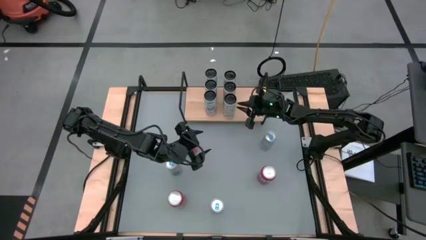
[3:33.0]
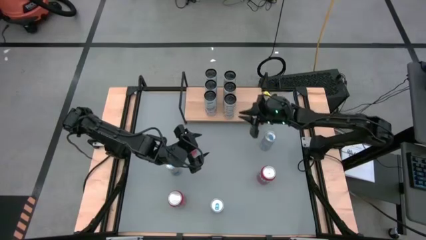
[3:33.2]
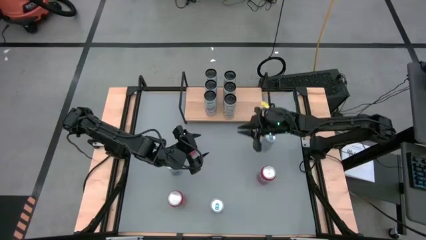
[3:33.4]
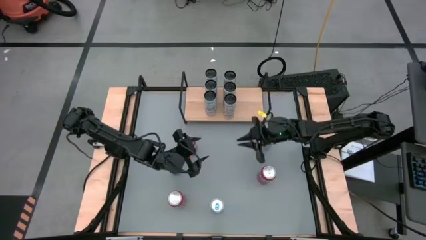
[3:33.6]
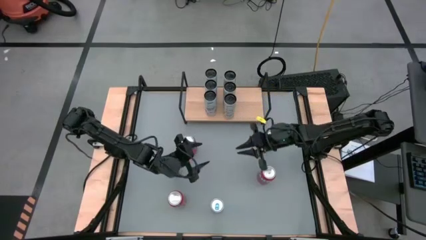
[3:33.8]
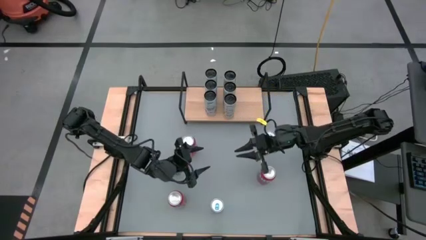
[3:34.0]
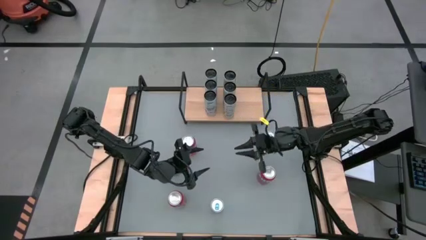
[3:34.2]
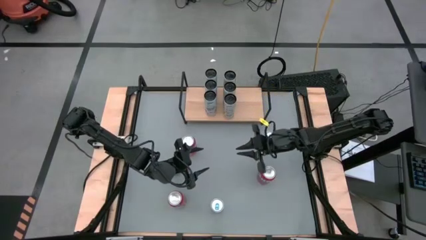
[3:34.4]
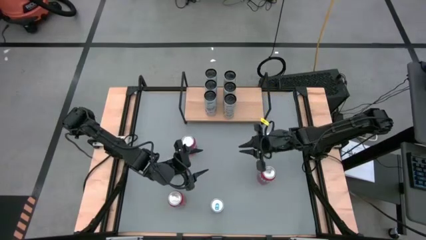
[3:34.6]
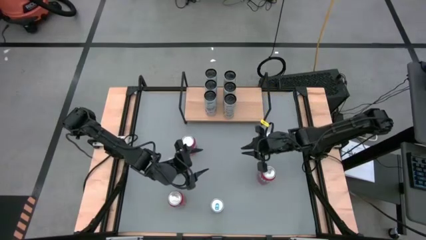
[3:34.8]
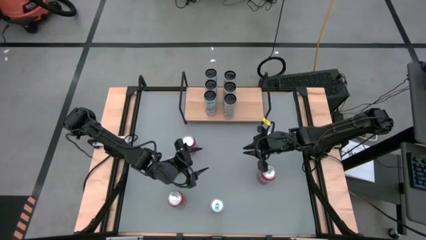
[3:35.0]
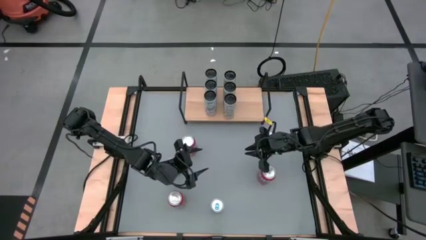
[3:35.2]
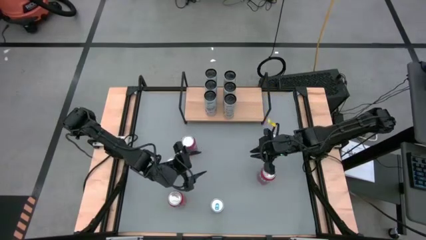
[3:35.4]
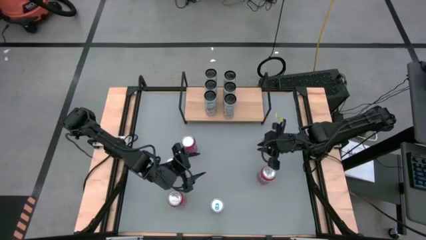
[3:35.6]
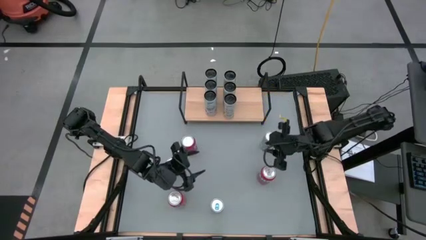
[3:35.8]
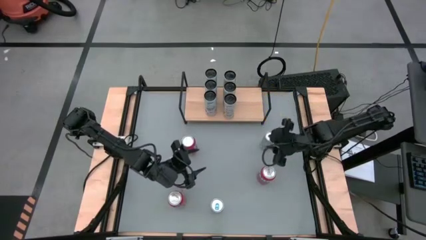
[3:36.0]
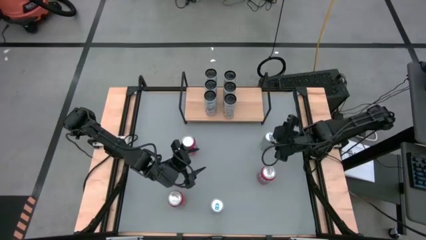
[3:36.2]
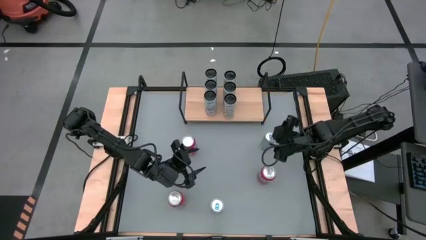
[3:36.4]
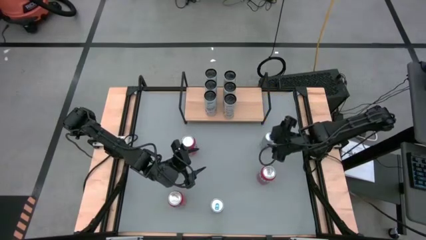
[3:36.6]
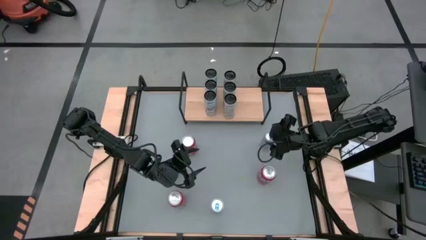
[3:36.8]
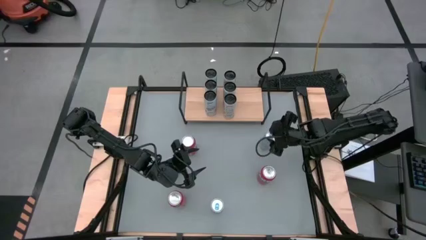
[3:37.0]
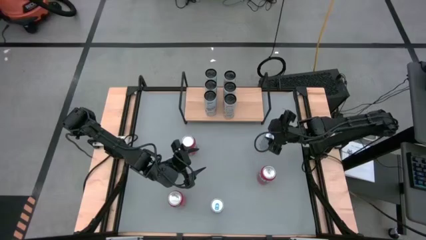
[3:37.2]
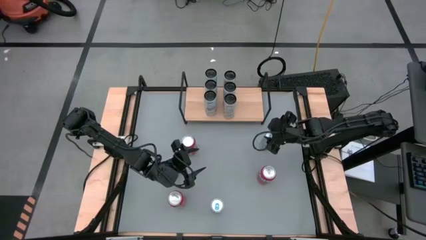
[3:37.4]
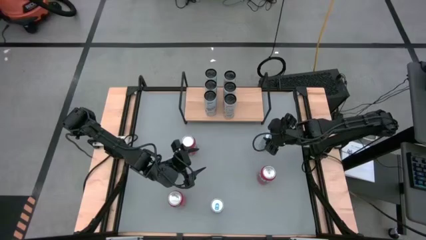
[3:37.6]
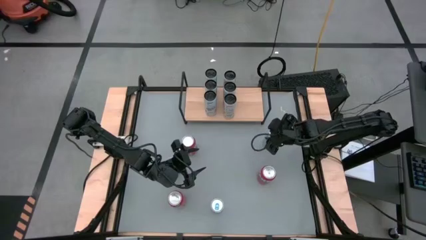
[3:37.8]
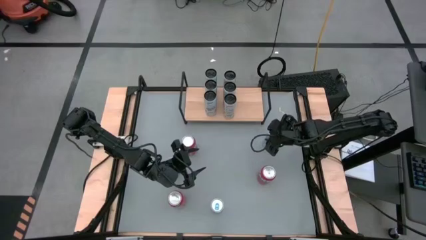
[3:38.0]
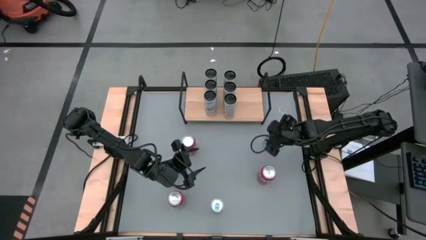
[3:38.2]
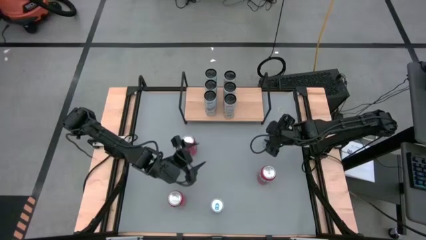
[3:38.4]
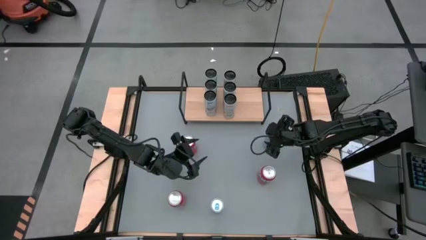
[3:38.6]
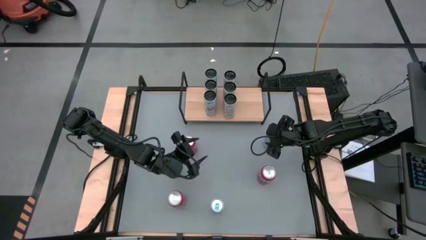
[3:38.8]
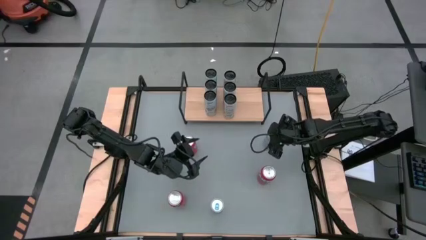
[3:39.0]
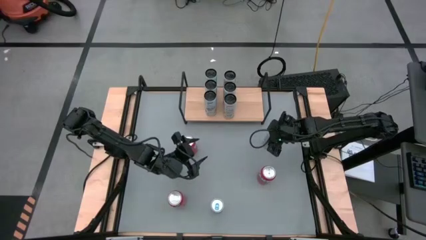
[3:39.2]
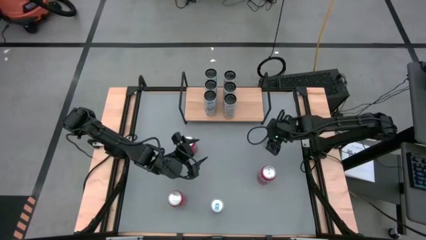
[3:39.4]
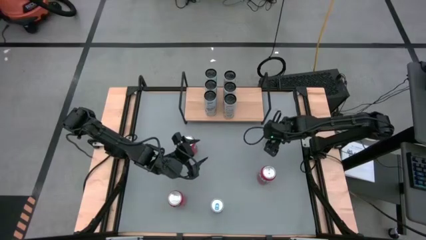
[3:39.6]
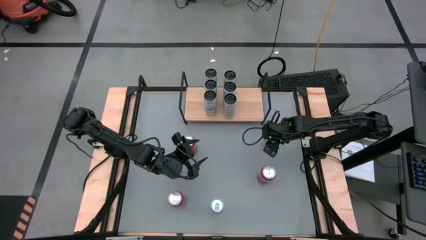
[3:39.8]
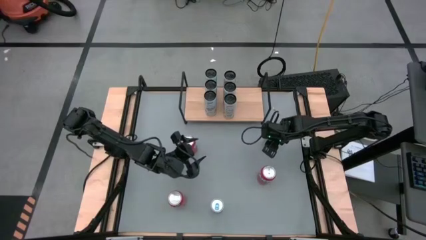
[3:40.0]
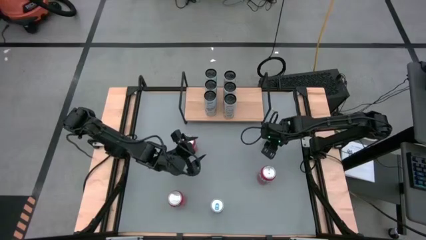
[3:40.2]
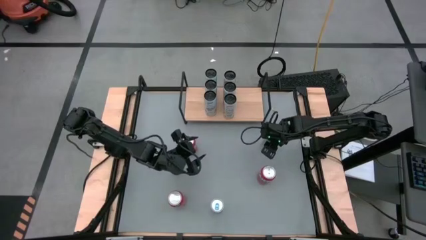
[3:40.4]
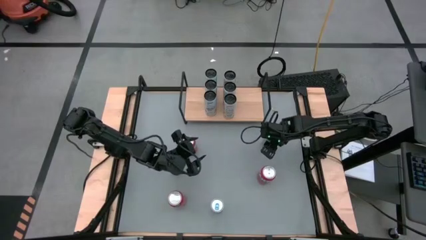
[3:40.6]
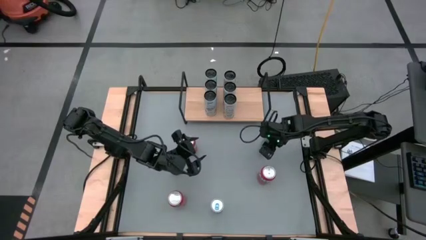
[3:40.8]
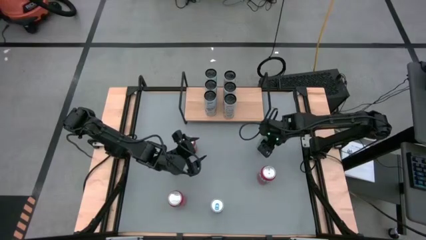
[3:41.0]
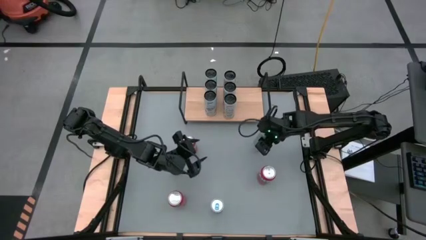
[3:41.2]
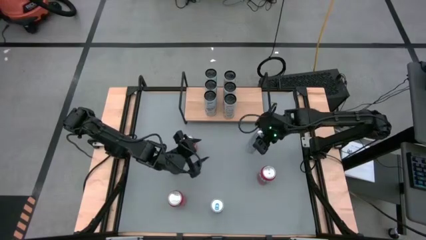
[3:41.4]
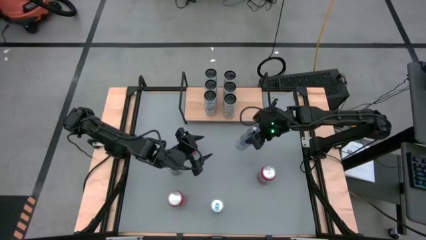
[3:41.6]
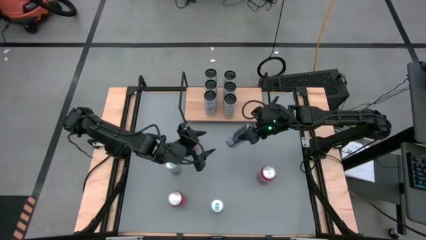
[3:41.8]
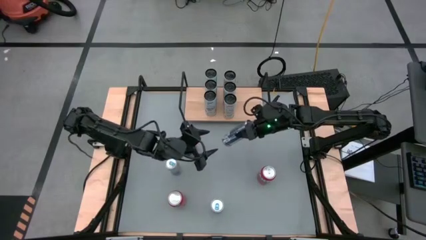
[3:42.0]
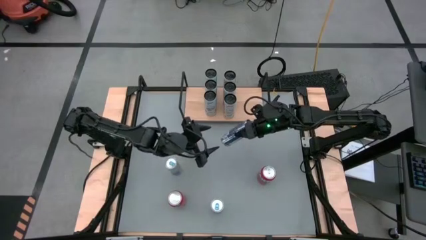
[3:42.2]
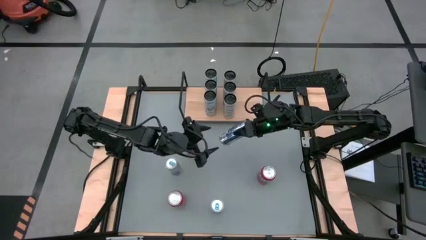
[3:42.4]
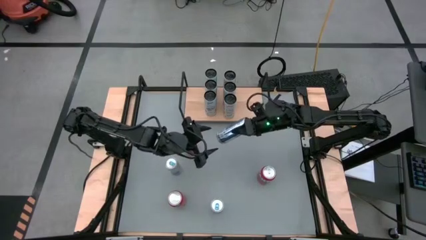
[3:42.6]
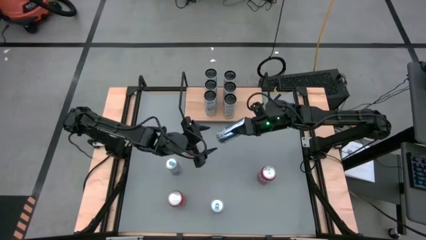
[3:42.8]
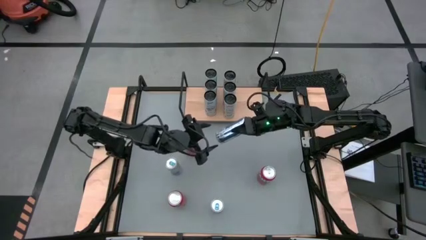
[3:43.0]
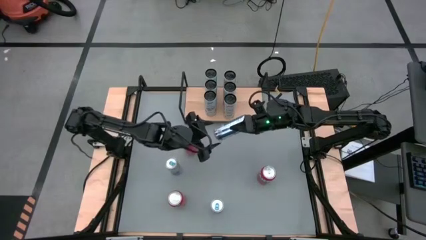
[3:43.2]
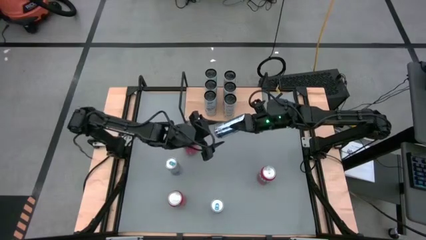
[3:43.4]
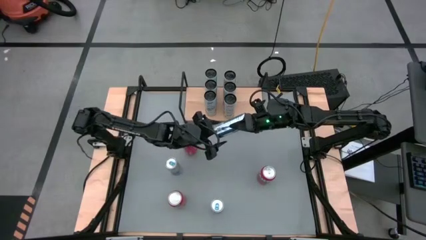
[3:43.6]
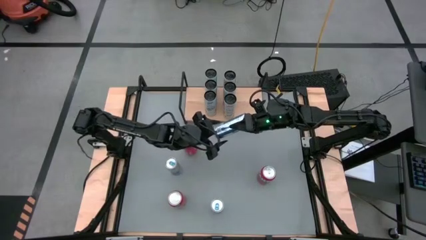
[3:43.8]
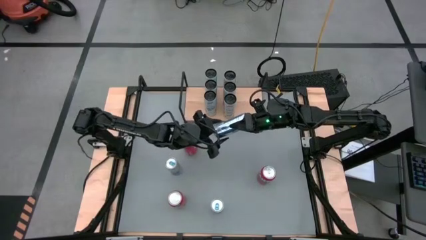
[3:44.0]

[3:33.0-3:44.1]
Task: Place canned beverage on shelf
Put the top right blue soda can on the shelf
